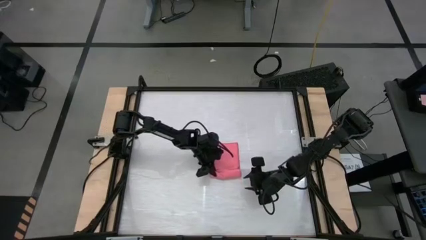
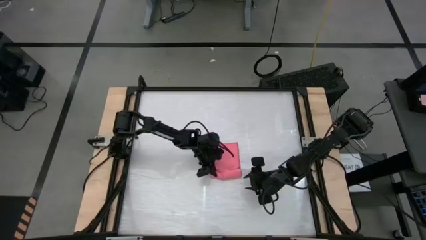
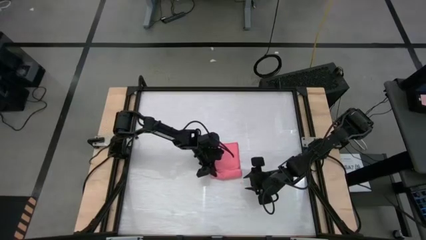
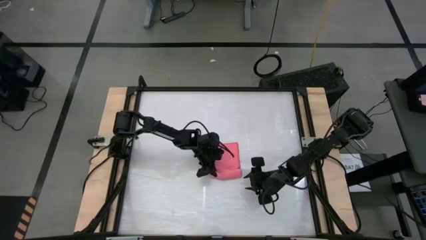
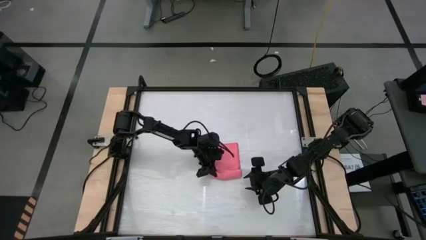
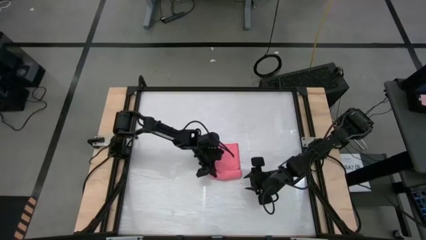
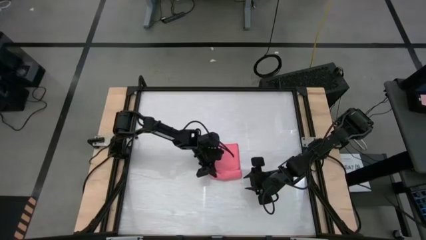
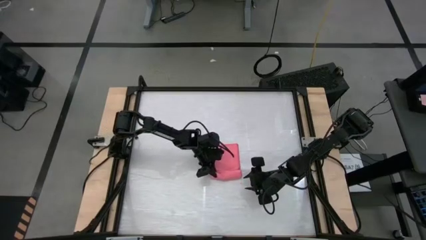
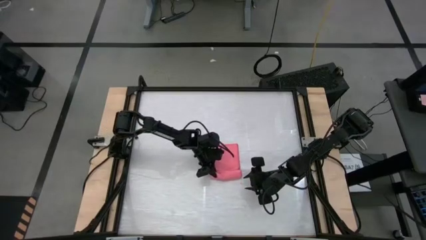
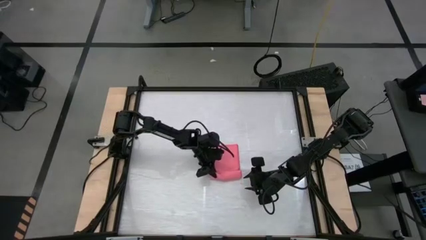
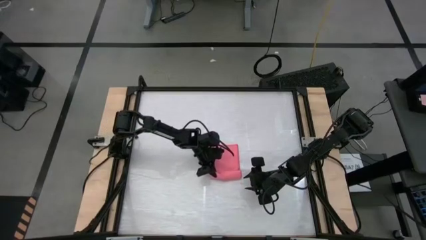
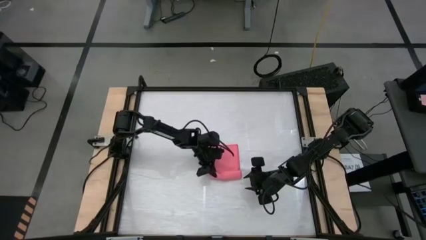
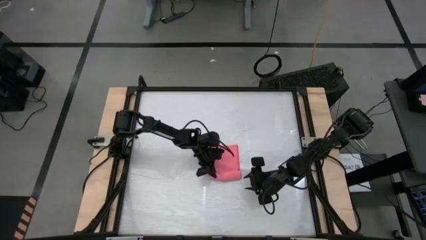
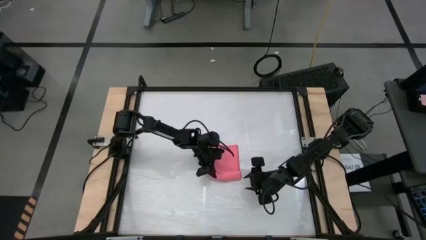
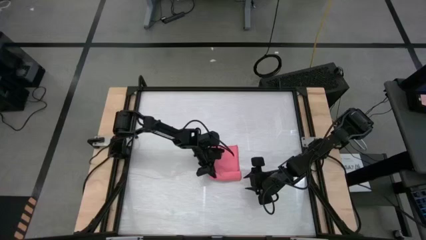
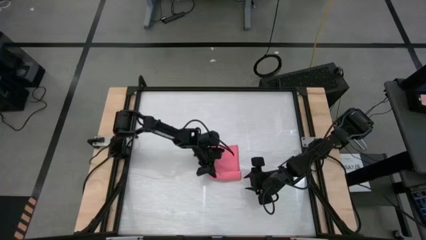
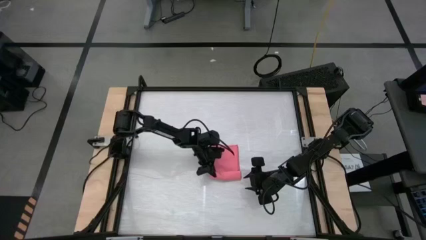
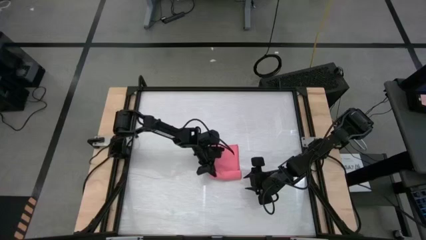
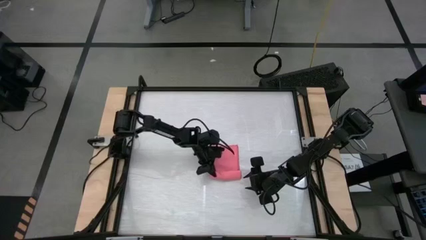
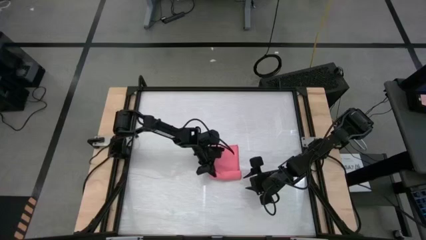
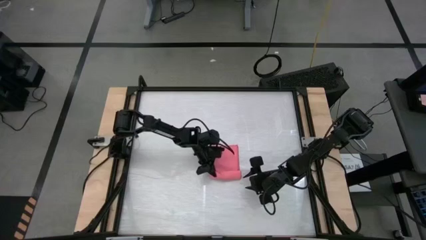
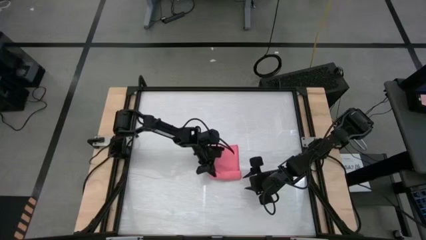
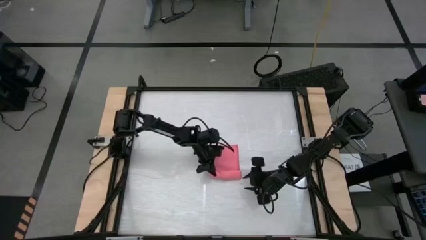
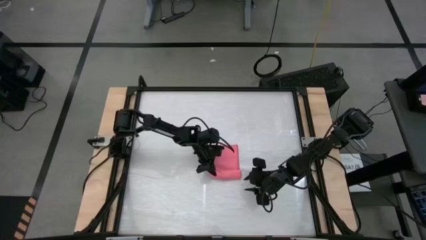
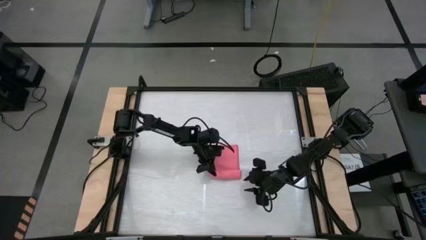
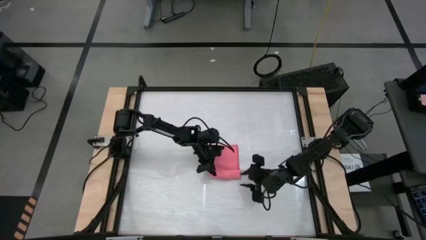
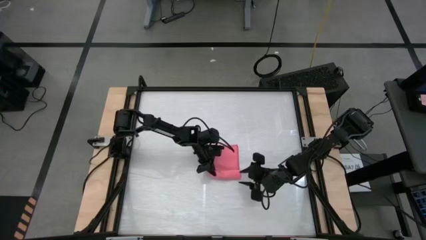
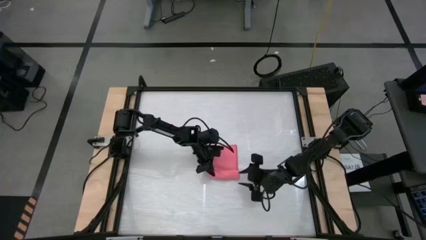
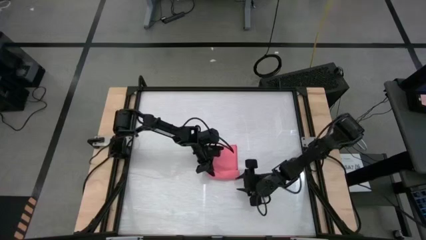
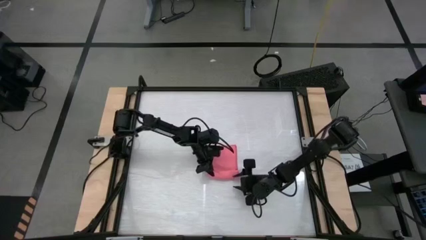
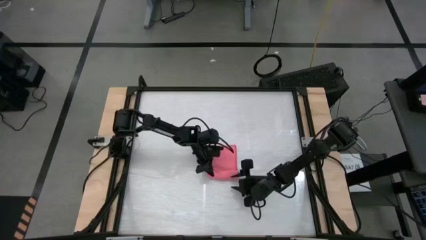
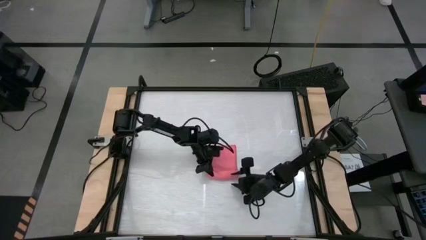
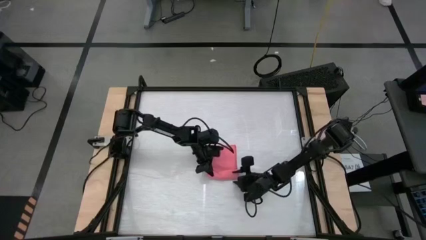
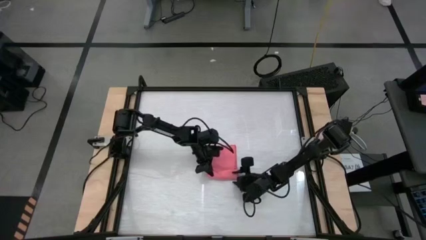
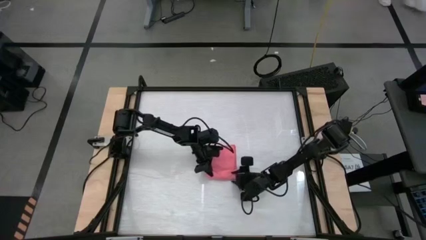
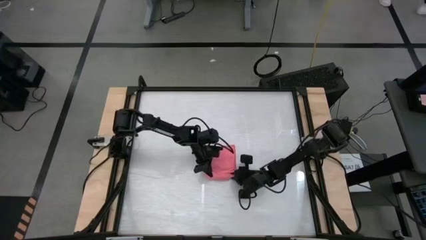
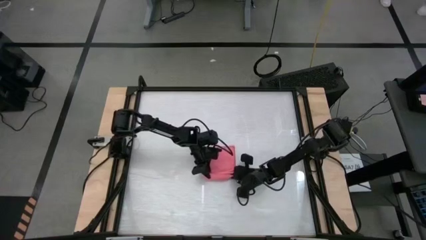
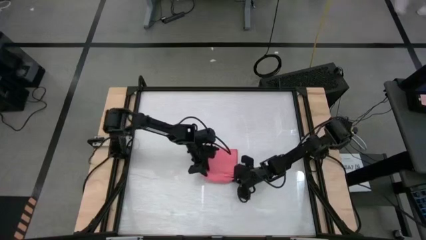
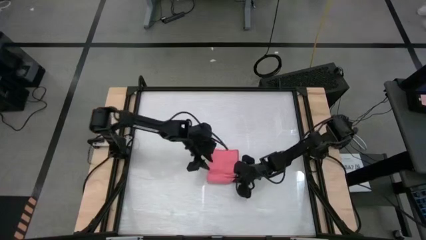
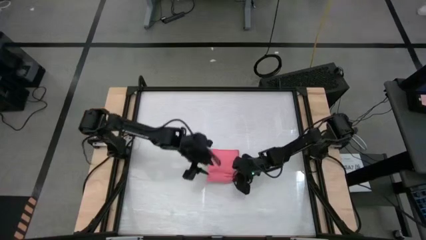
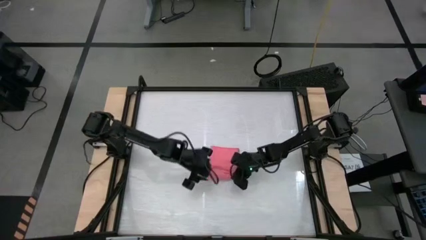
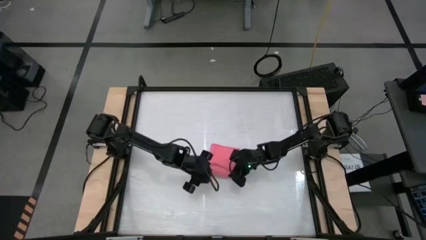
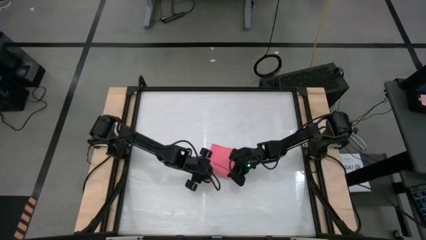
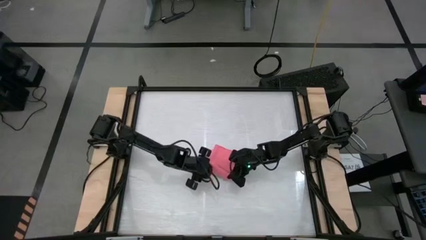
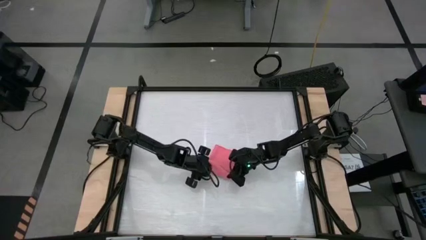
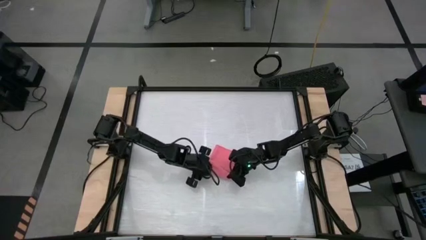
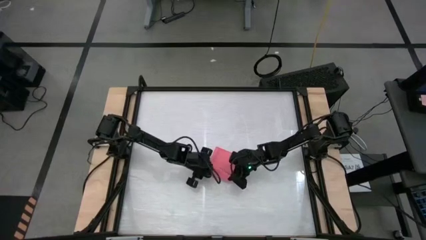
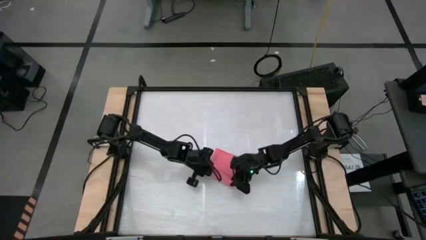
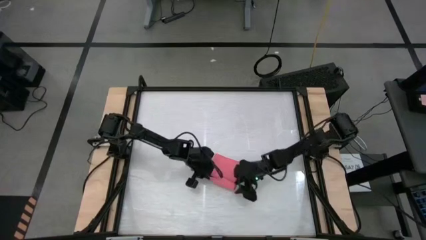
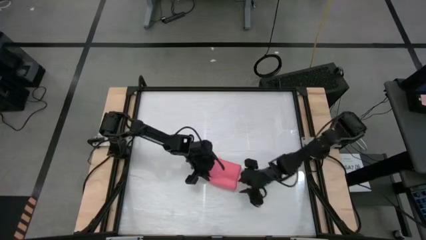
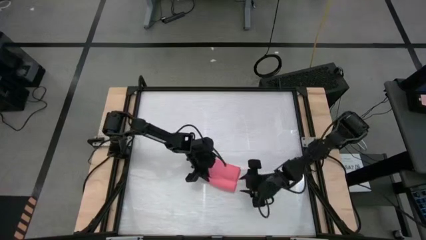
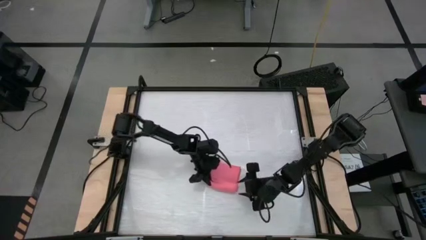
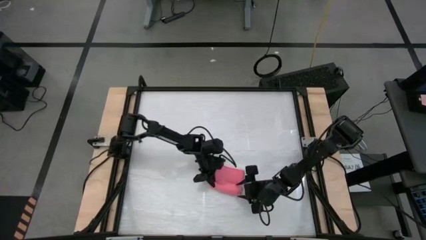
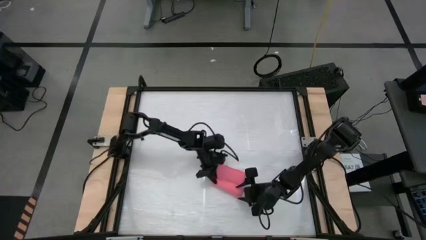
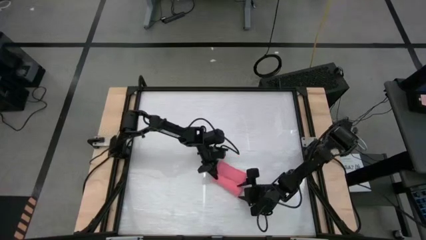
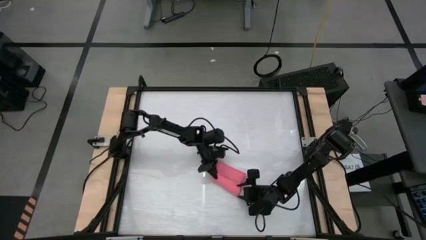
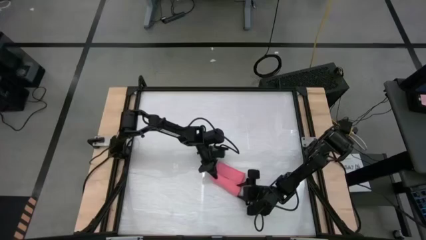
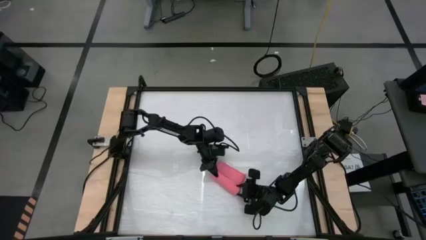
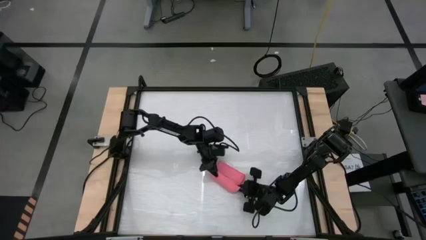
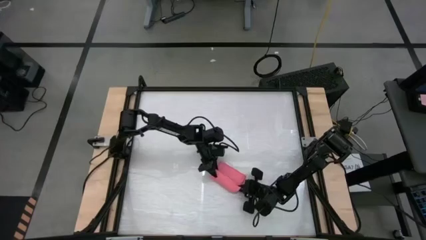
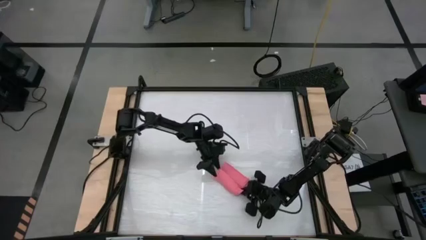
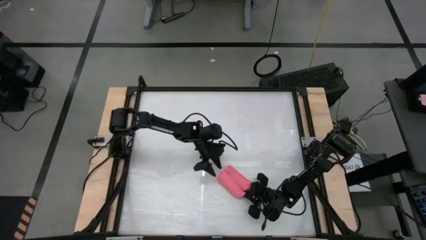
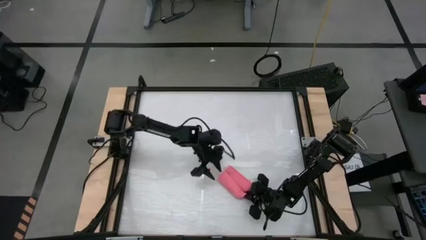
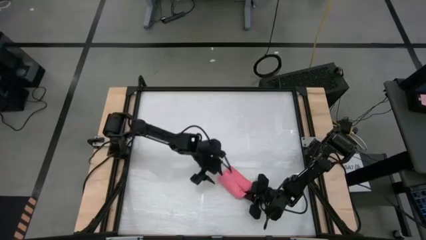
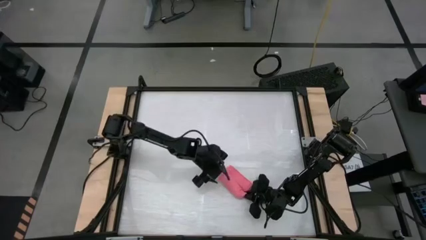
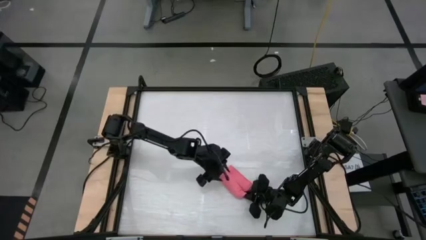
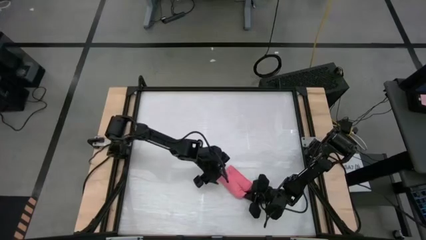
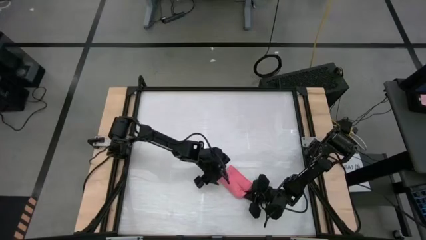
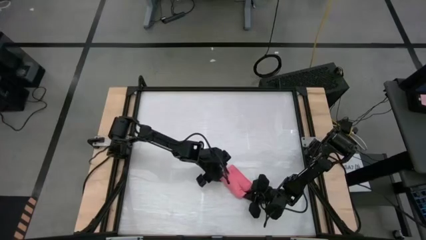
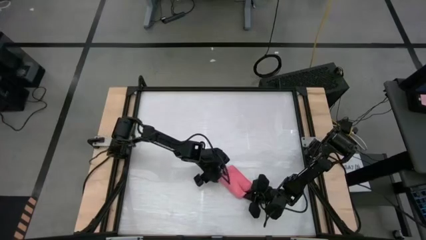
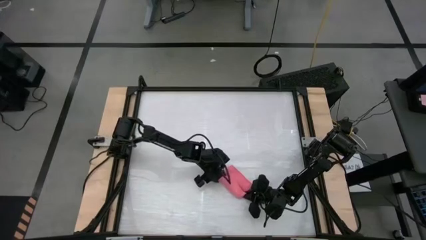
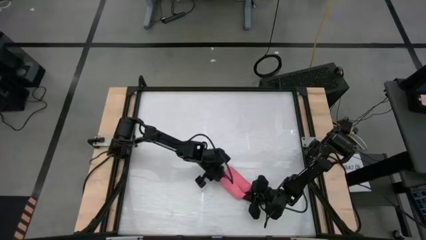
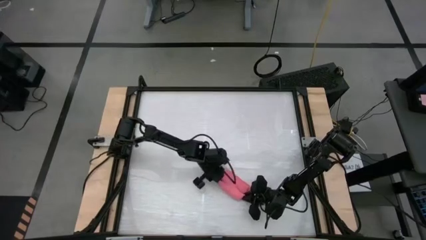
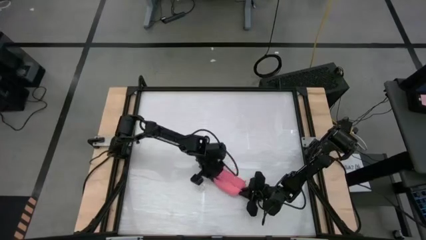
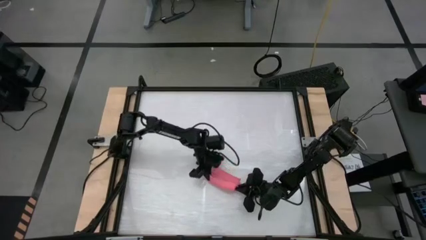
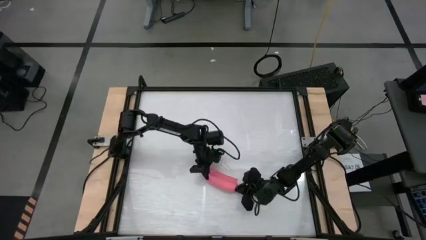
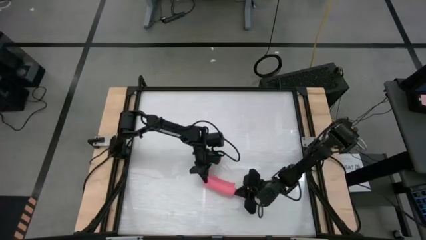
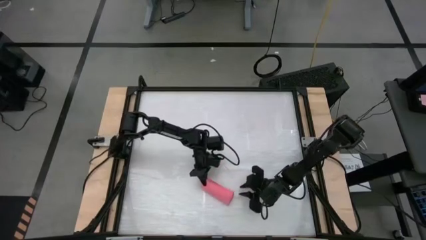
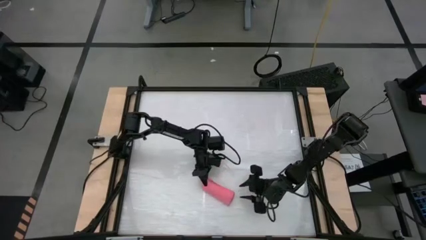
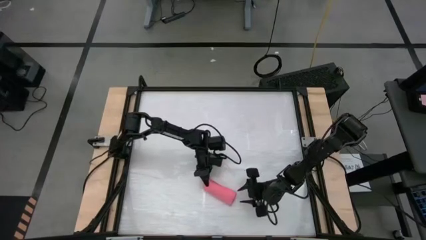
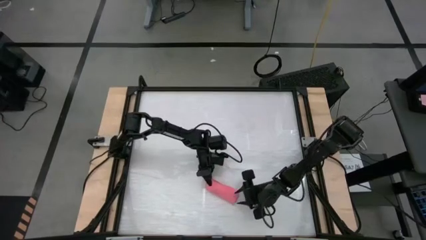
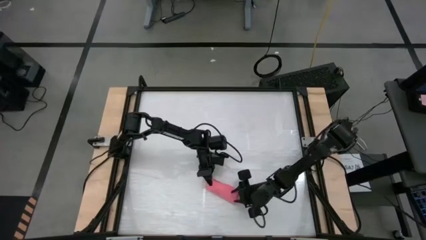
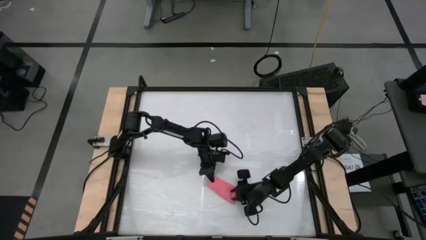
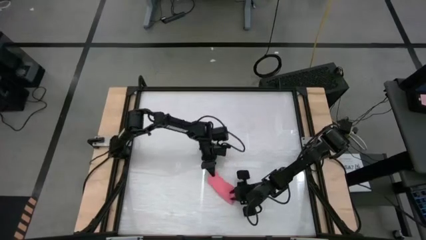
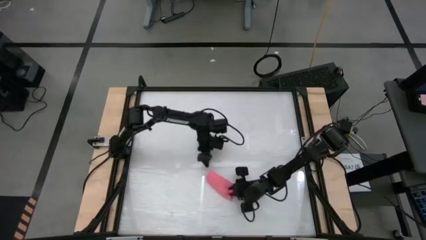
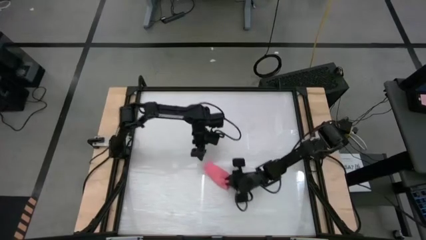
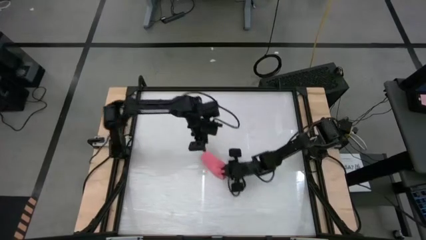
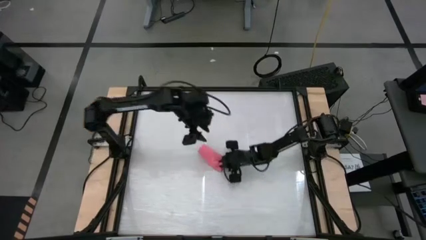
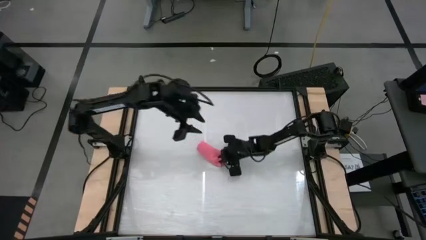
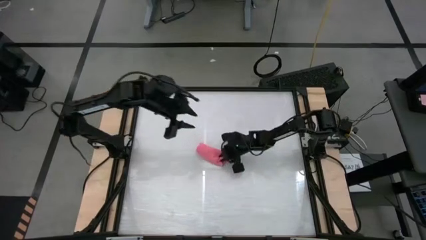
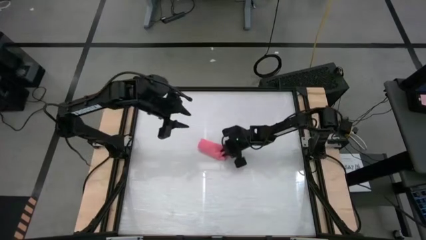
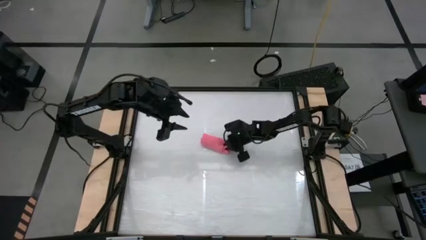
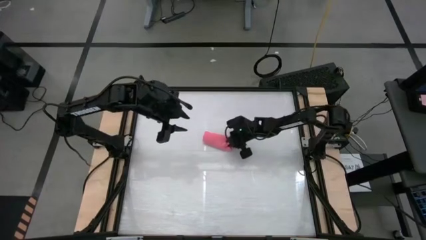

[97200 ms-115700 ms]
Task: Roll towel
Fold the pink towel
